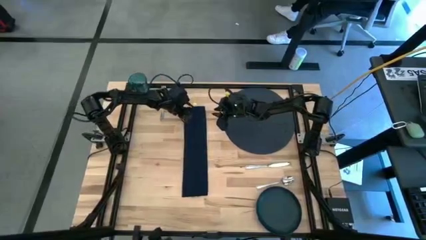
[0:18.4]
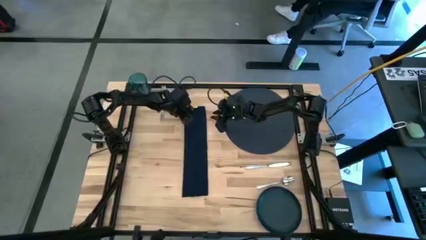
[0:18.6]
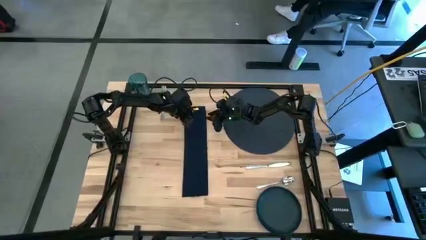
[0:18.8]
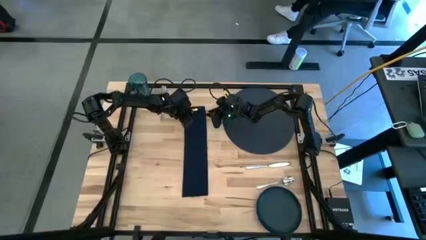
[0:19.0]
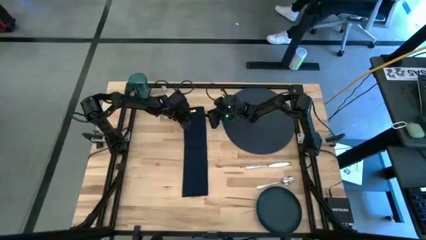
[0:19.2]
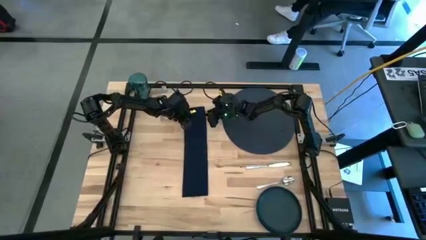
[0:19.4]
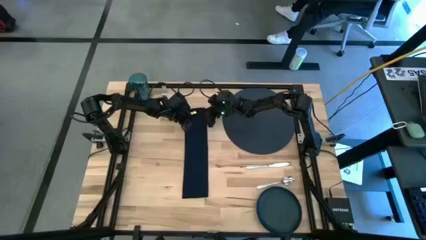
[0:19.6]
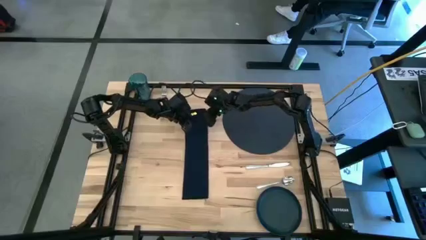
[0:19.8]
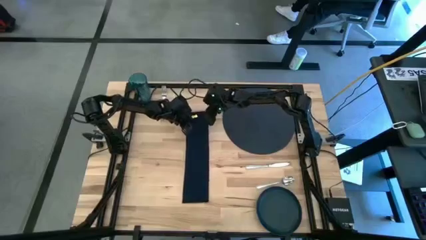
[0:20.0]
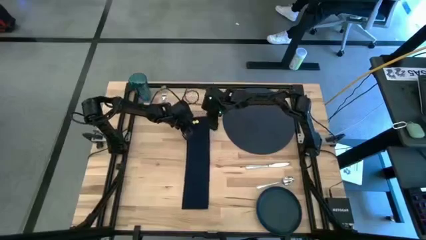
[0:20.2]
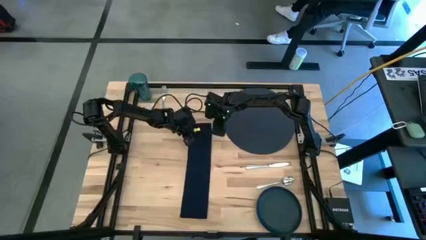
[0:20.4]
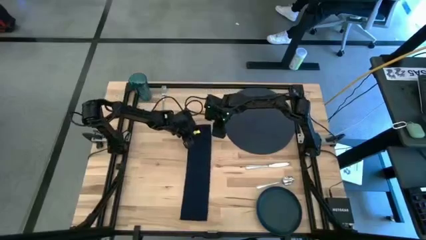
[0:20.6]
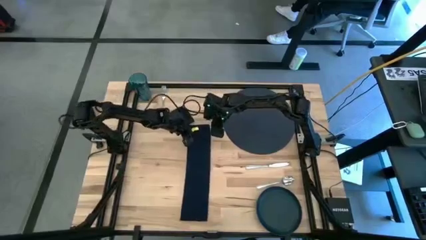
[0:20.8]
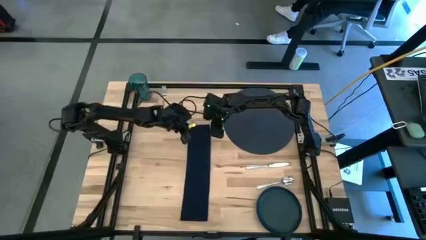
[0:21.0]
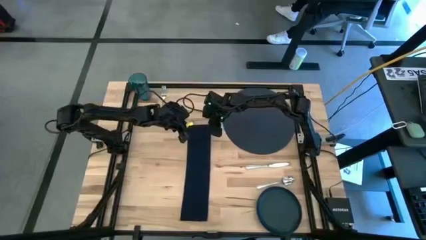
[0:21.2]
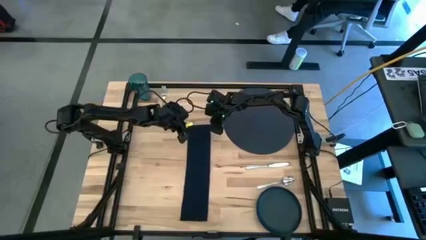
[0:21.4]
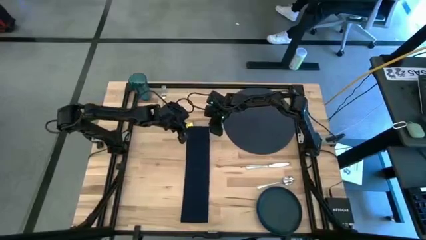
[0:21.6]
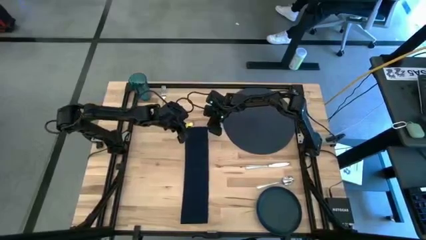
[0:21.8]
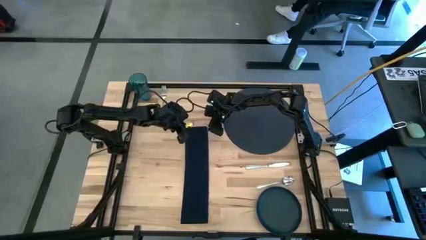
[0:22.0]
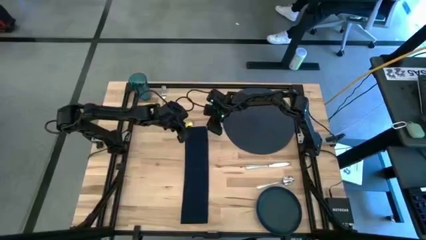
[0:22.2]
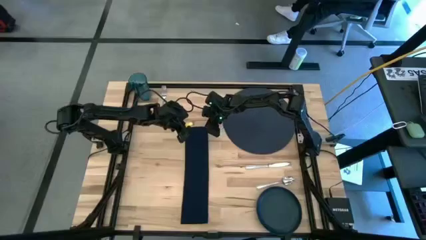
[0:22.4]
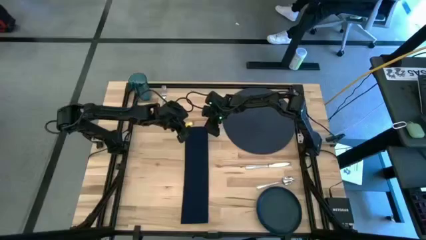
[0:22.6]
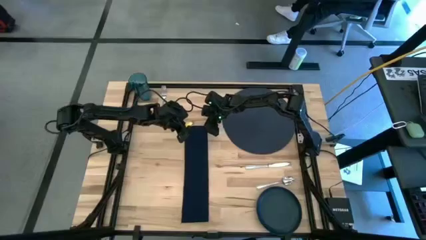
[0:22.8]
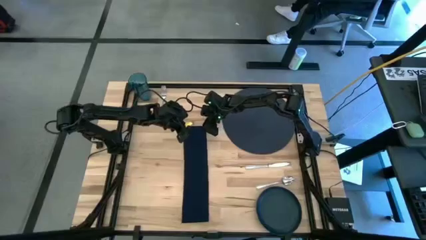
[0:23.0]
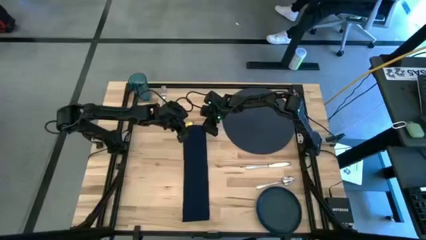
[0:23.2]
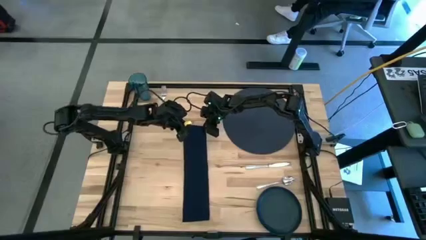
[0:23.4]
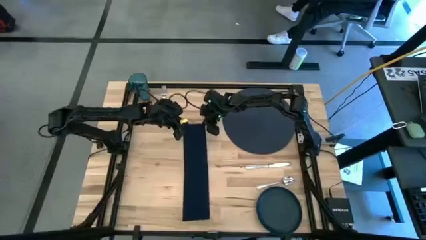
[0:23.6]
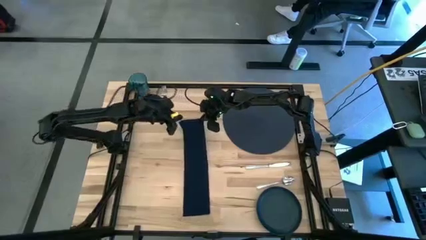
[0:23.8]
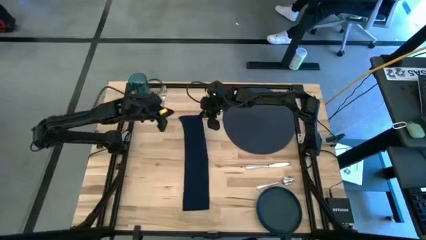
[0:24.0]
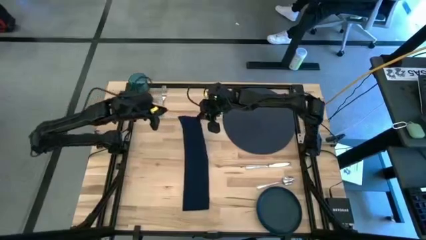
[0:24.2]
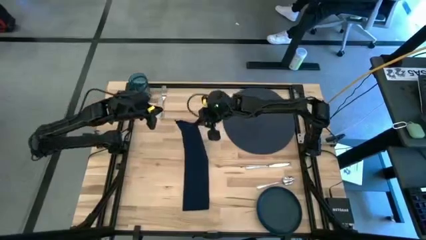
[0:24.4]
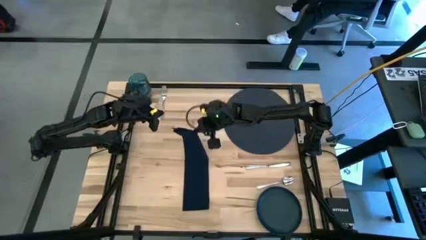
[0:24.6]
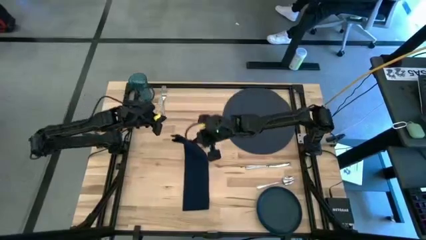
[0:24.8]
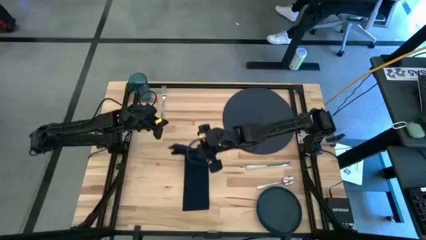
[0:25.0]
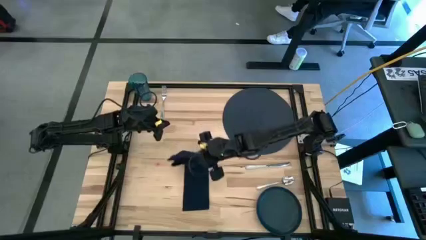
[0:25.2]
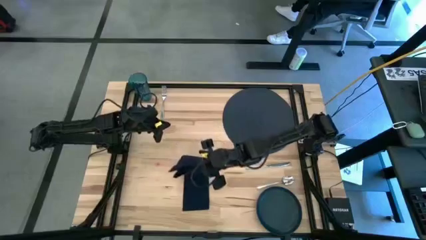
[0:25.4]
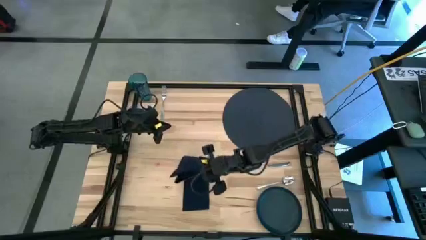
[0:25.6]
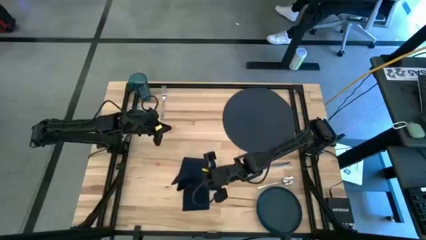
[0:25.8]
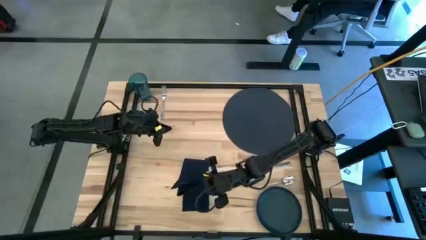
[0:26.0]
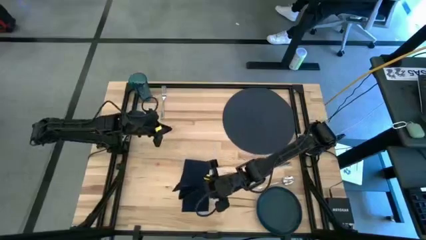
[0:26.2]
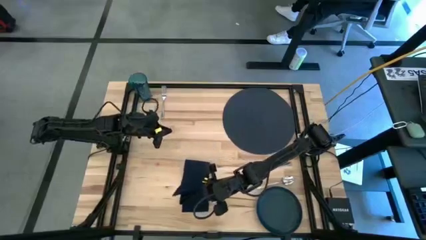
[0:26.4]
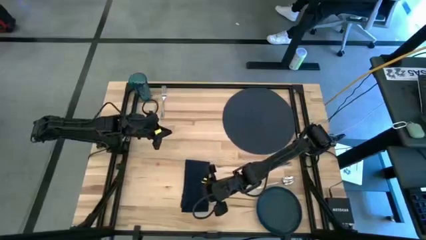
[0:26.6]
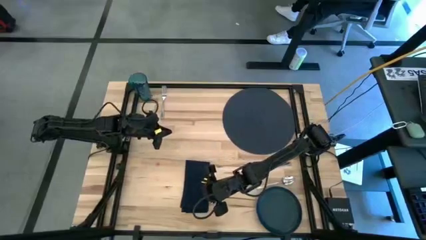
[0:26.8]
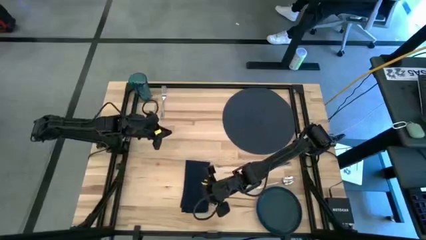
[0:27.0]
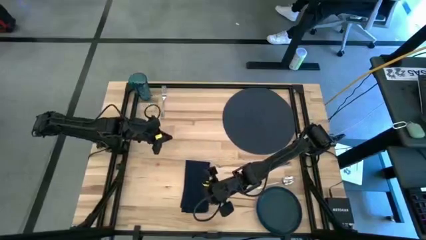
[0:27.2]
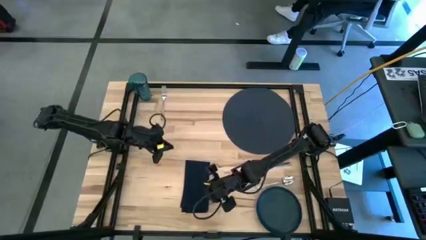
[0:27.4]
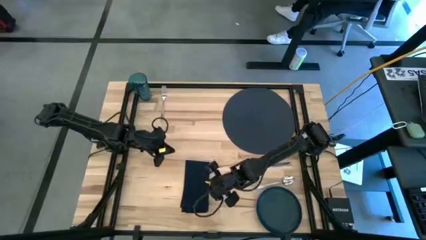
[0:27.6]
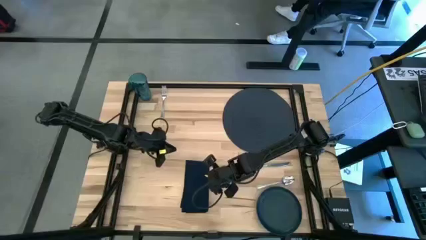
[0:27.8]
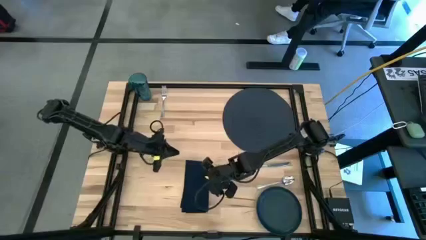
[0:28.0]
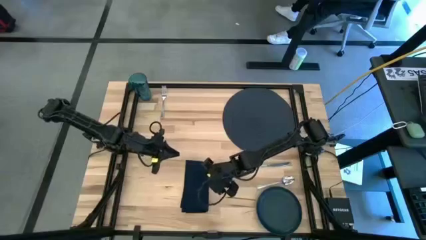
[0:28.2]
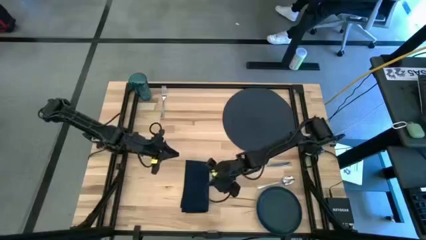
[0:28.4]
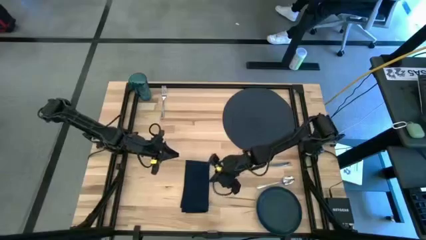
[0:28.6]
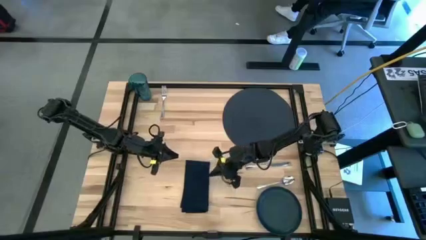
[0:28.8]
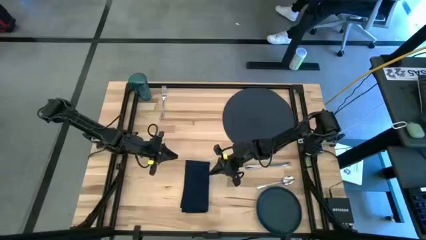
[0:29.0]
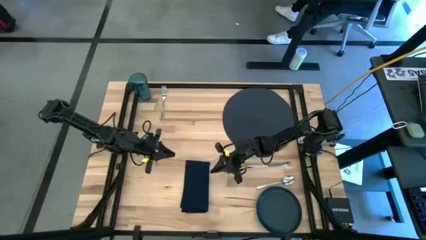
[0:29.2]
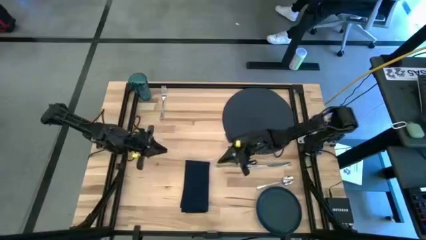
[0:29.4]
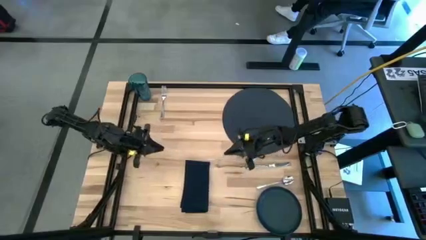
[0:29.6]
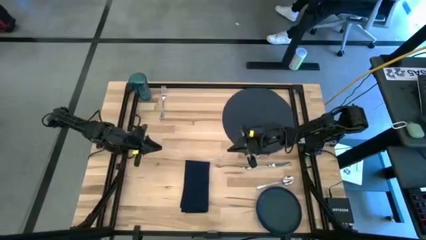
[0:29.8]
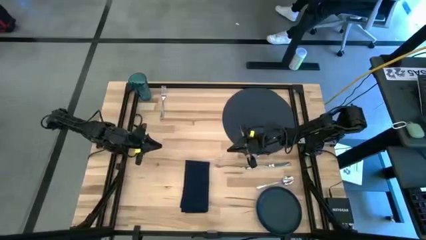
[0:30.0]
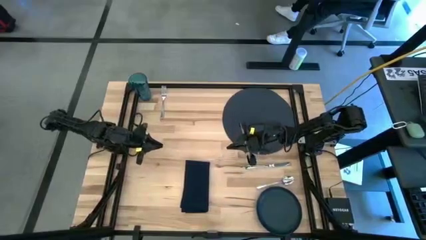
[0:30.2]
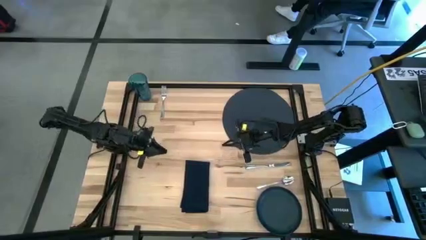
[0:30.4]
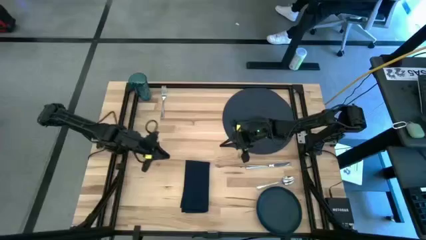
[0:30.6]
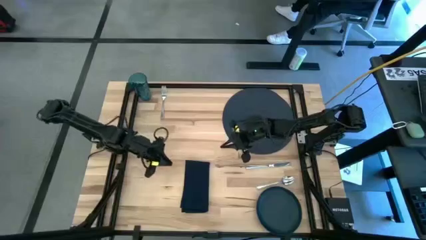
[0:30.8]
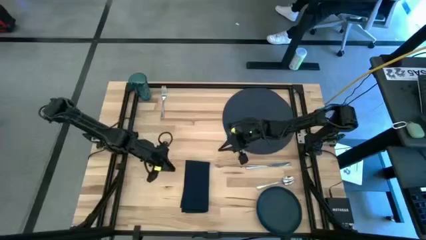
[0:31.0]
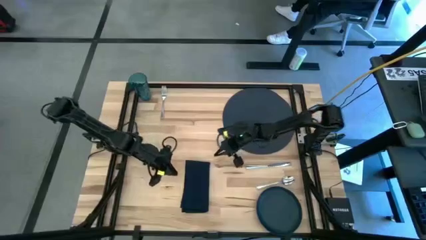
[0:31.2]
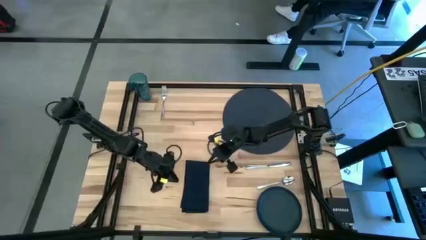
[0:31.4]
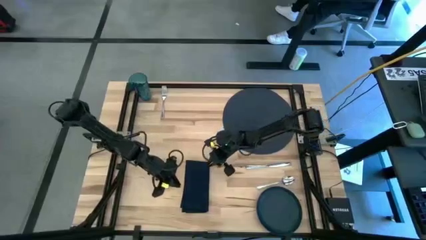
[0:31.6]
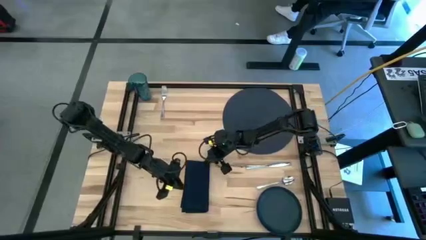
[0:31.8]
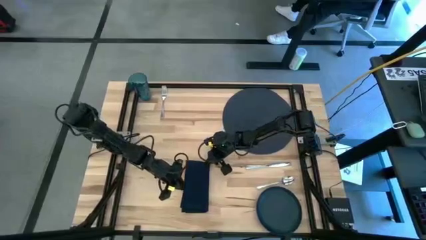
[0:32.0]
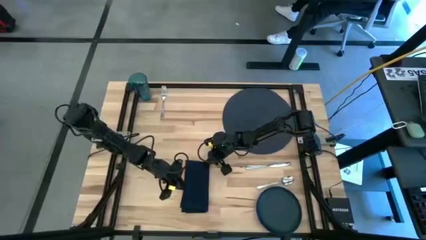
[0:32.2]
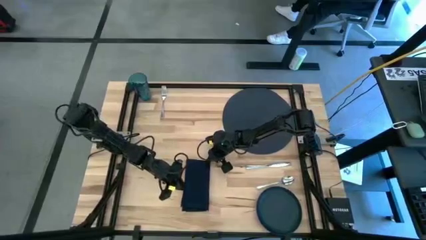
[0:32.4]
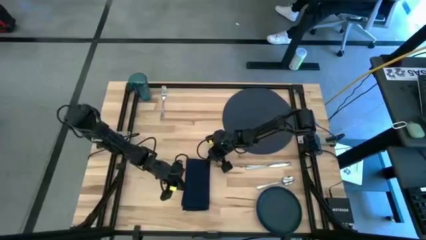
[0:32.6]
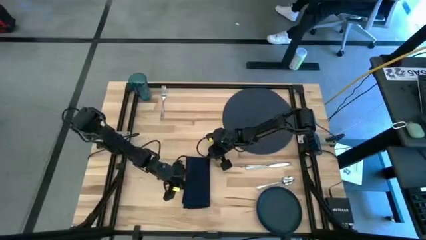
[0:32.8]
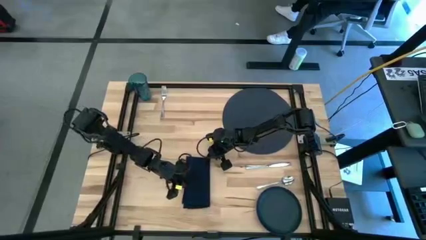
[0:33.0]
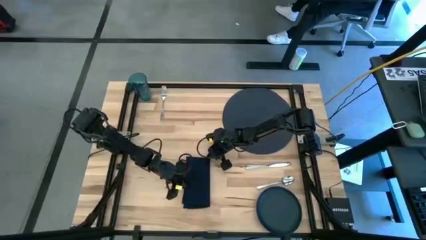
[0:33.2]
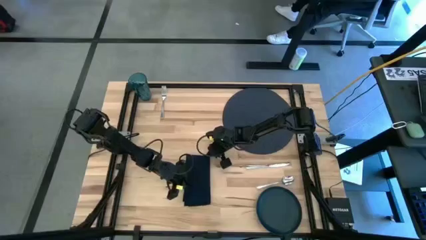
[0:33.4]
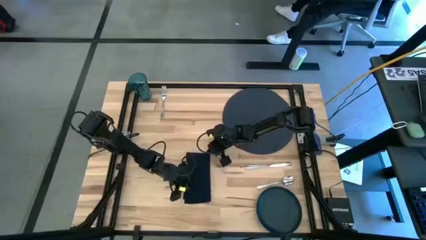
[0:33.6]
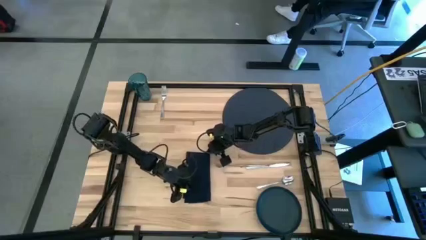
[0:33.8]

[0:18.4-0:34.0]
Task: Set table place
Fold the black table napkin
